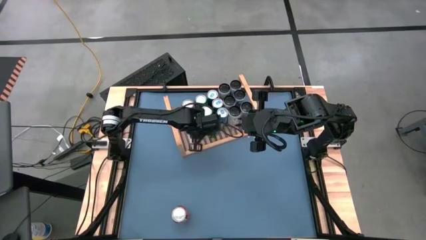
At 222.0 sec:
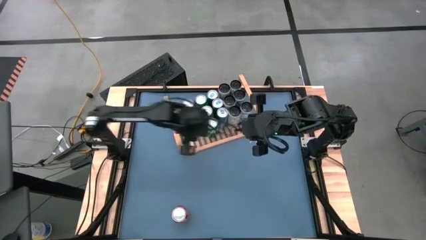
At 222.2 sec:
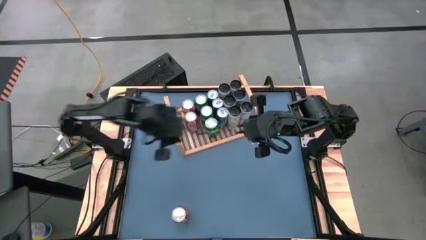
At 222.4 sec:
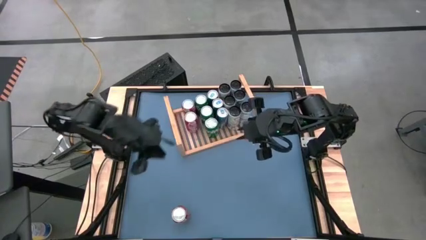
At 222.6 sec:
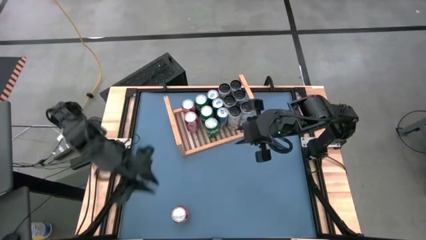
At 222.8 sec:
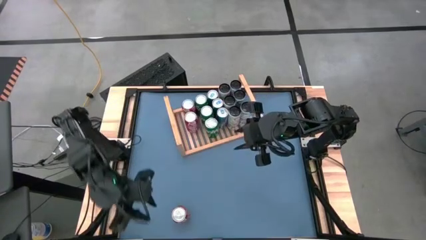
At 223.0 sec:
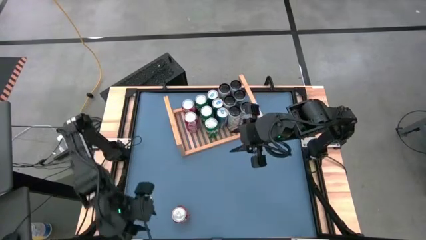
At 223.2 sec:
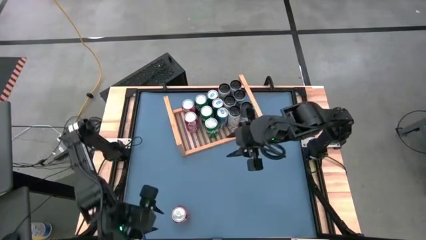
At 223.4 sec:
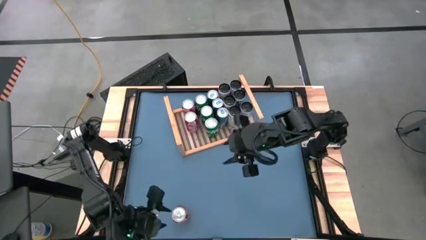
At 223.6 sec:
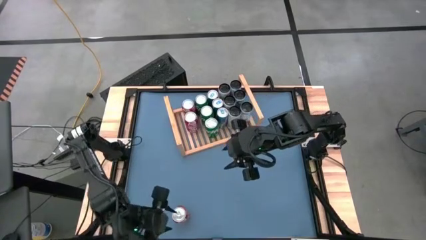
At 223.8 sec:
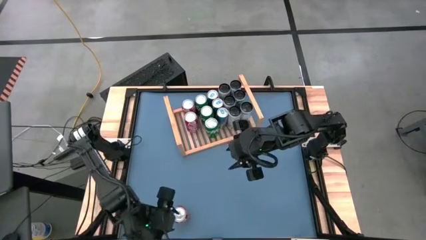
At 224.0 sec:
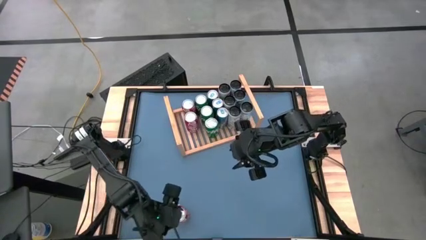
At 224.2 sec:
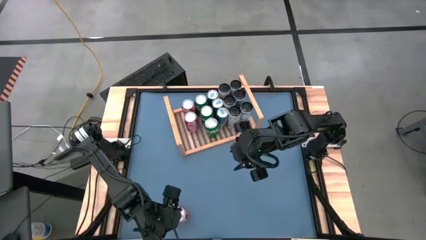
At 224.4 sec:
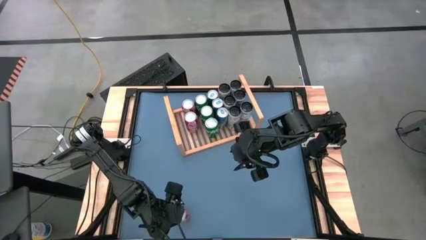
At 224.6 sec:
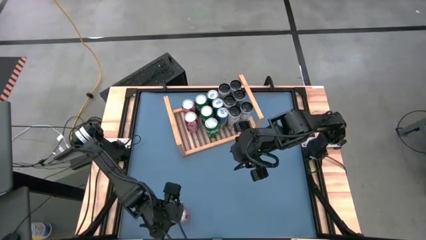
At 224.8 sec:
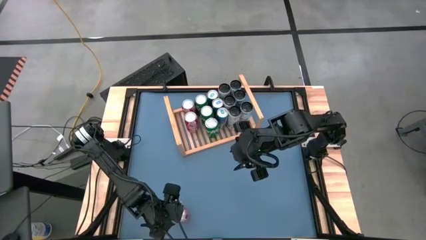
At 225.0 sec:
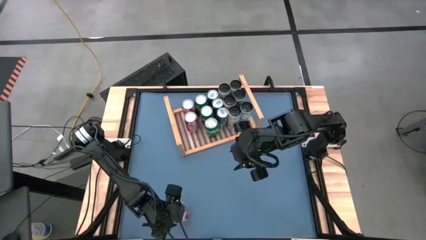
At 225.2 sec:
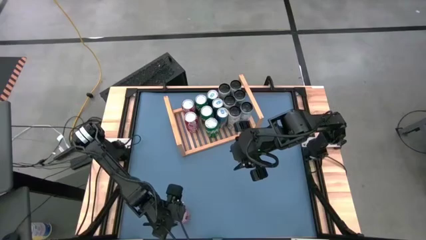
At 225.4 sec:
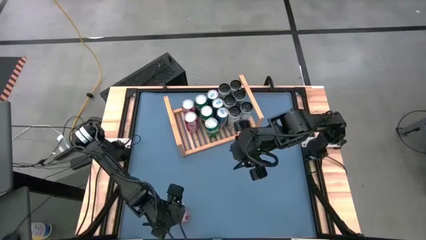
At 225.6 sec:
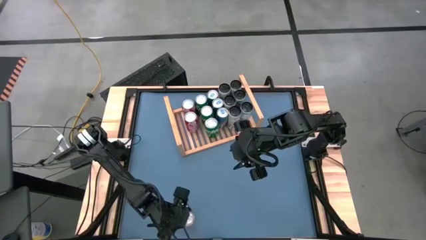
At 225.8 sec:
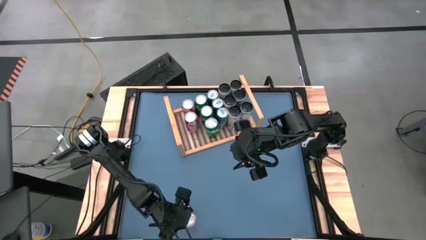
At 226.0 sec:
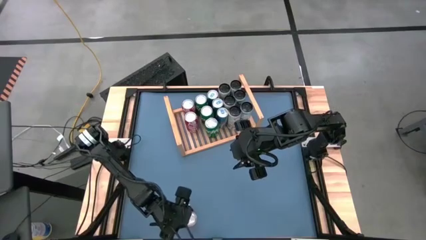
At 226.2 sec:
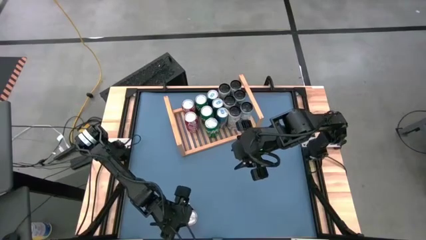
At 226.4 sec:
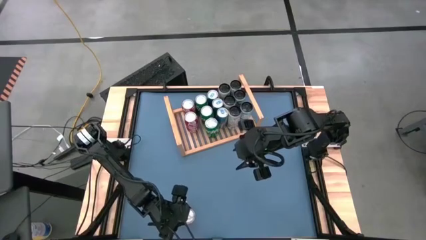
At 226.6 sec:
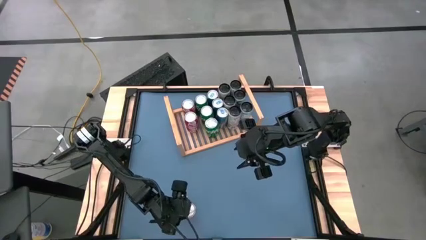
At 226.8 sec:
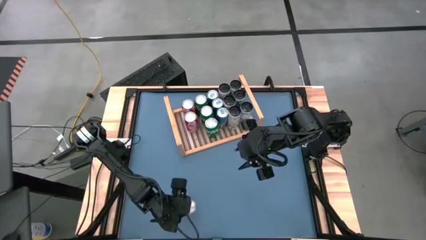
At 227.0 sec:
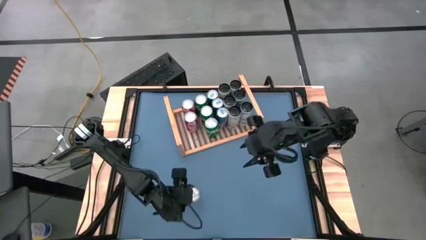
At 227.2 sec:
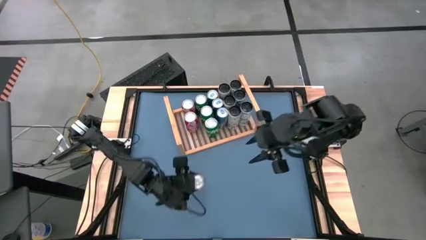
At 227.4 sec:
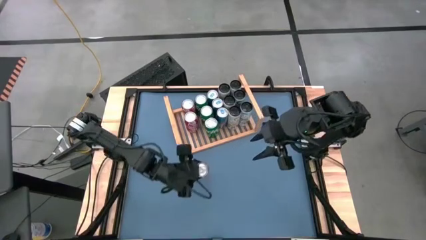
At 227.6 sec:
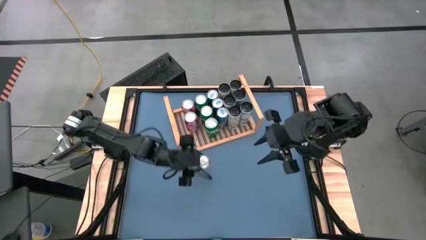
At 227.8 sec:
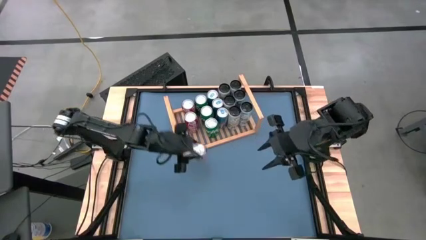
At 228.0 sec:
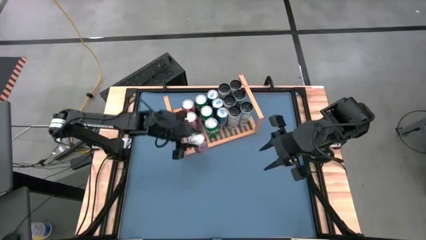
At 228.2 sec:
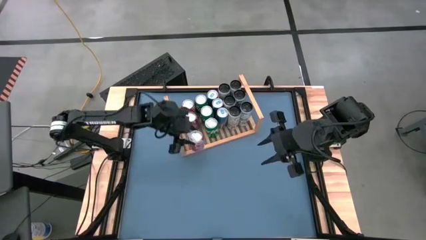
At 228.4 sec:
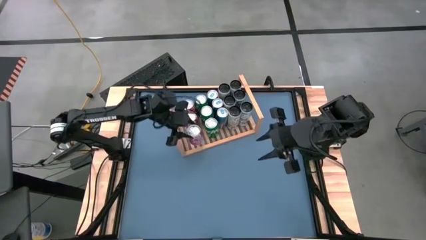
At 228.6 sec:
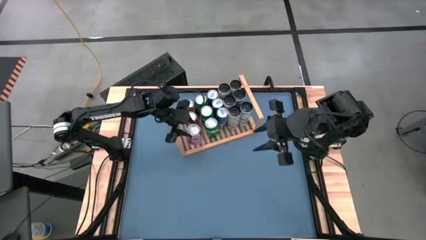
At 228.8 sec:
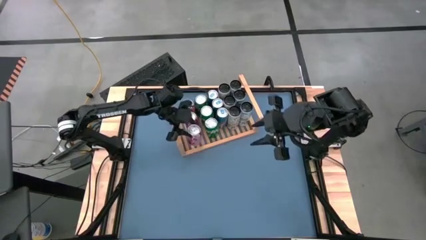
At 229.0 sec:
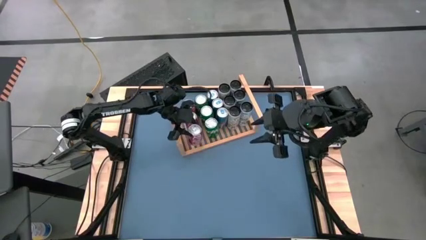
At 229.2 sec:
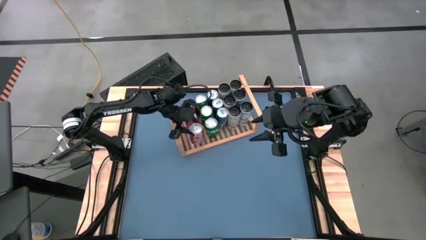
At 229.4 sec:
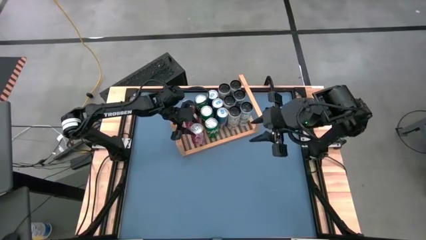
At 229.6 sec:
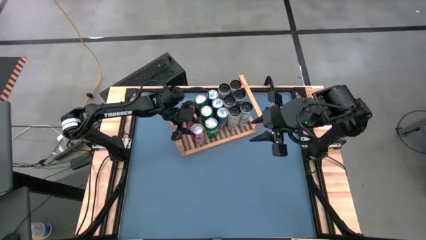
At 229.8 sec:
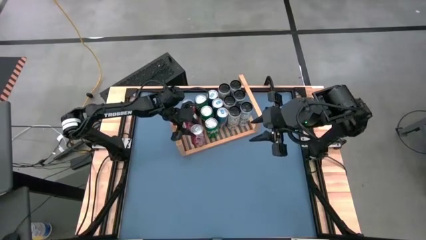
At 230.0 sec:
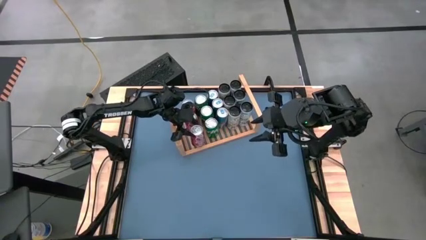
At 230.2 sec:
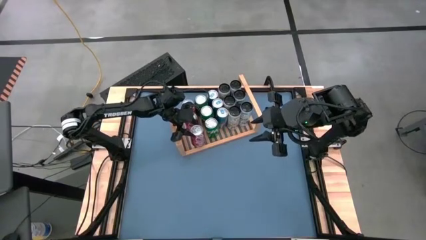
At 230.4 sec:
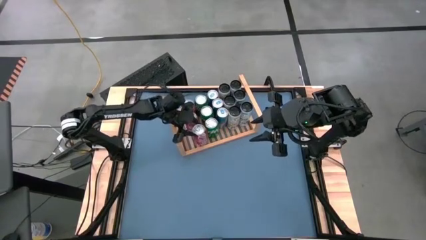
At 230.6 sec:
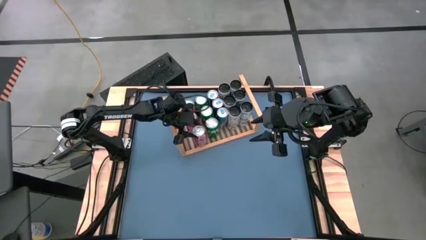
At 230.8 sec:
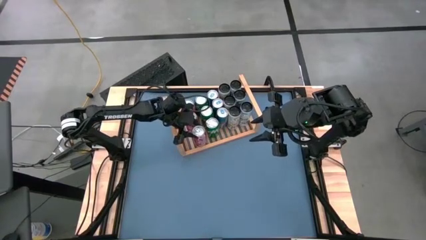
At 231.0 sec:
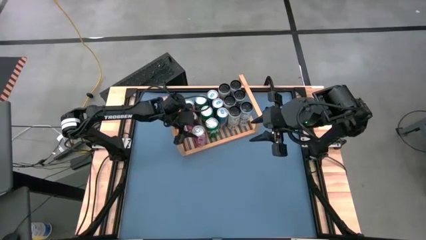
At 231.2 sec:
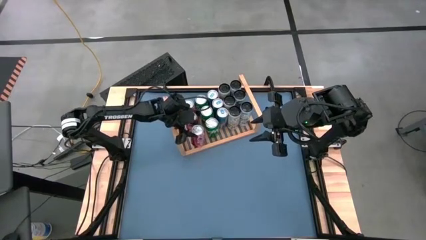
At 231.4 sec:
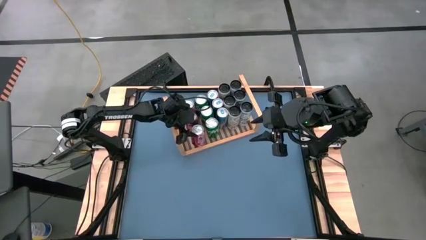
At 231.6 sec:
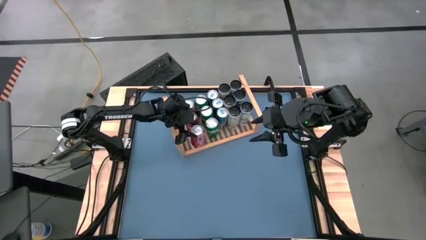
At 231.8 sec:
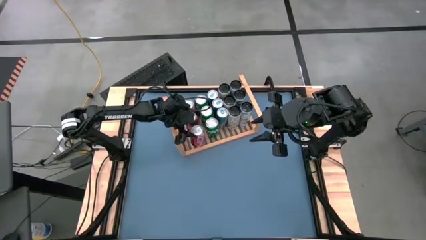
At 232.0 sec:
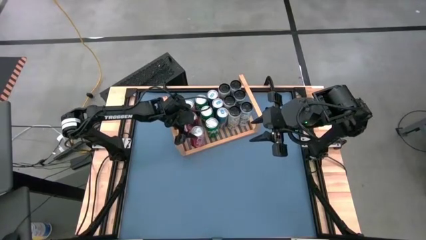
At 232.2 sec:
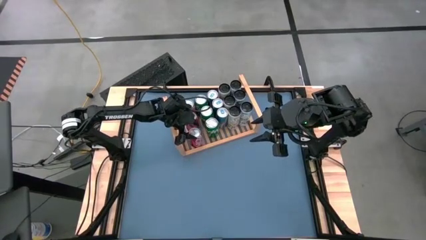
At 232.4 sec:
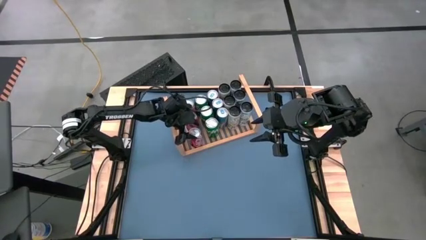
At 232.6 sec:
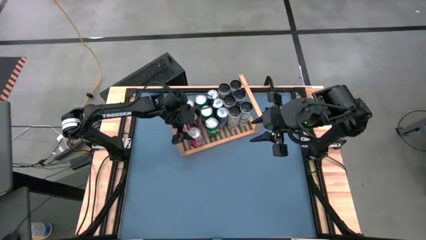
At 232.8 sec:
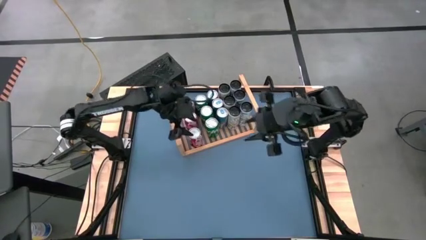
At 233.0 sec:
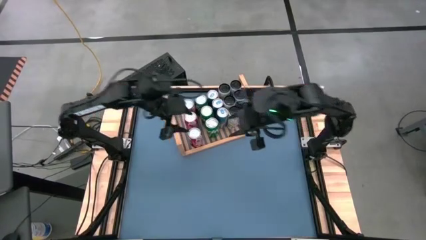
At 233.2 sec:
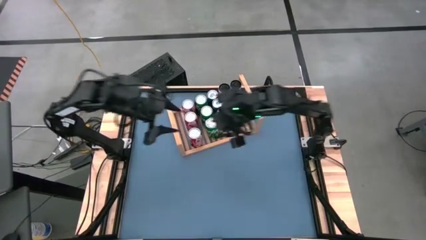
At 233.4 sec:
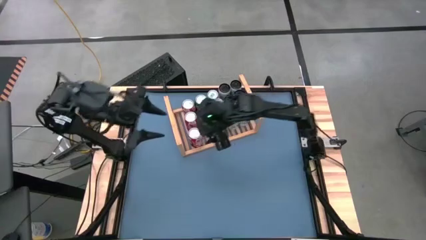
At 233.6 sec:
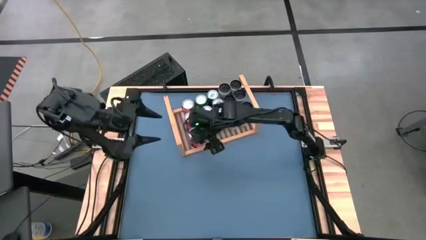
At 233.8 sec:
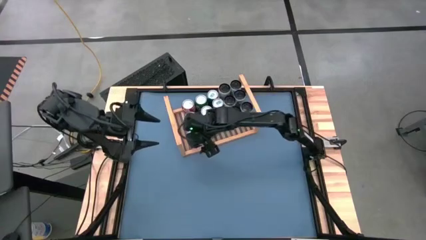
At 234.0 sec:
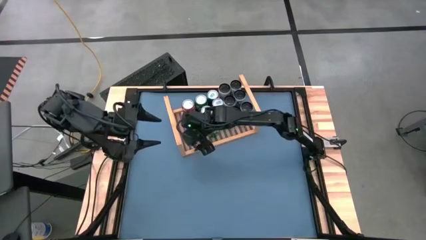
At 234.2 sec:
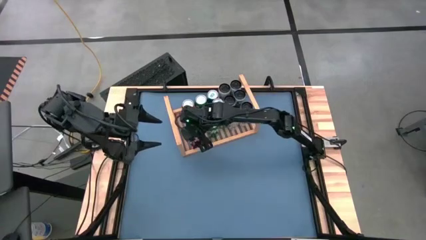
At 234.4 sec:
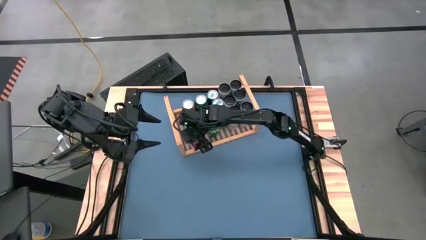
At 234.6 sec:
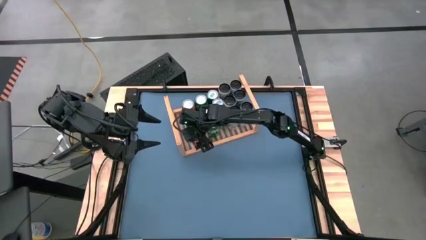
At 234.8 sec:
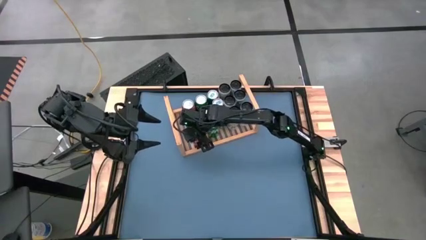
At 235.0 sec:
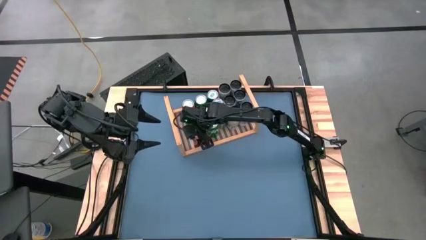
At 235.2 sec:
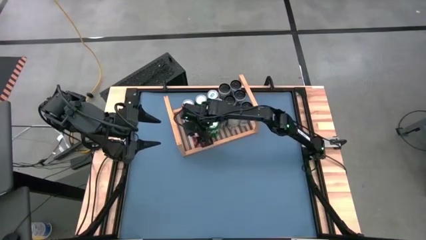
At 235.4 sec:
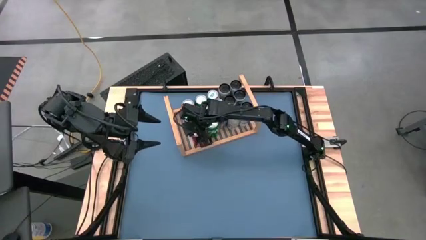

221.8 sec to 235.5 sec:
Task: Place canned beverage on shelf
Put the red-white soda can on the shelf aligned with the other red-white soda cans

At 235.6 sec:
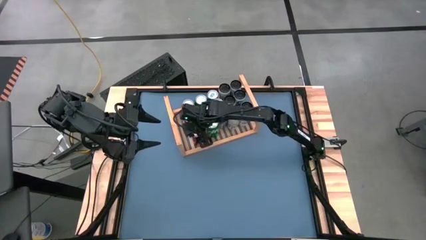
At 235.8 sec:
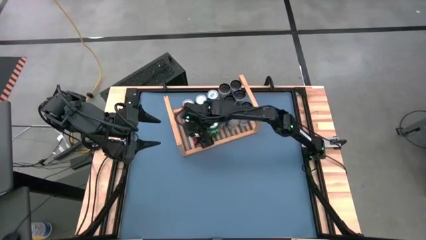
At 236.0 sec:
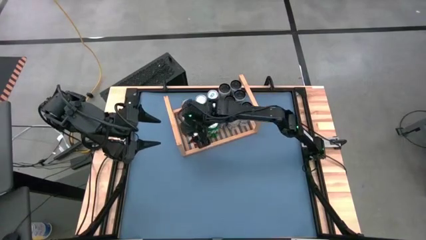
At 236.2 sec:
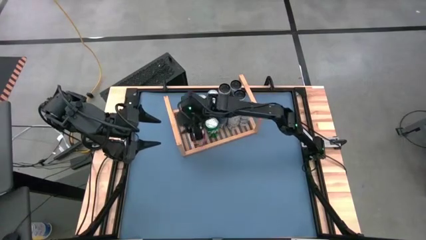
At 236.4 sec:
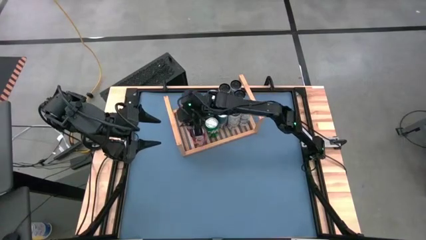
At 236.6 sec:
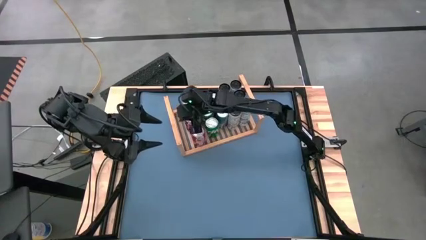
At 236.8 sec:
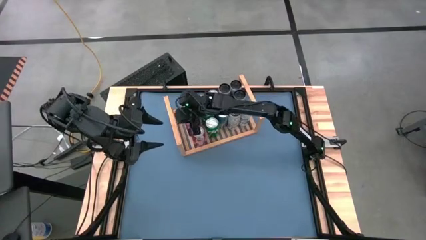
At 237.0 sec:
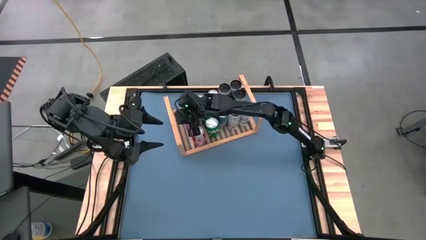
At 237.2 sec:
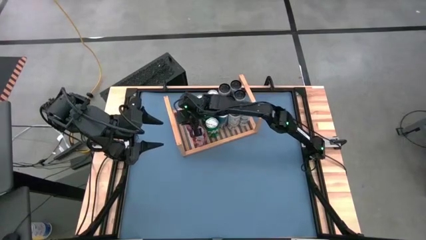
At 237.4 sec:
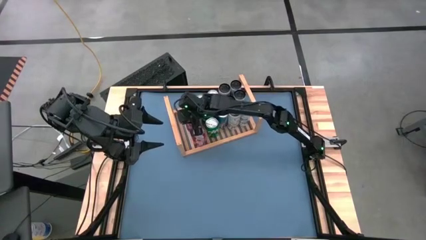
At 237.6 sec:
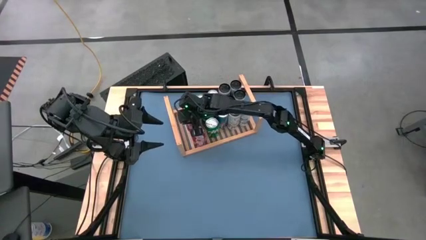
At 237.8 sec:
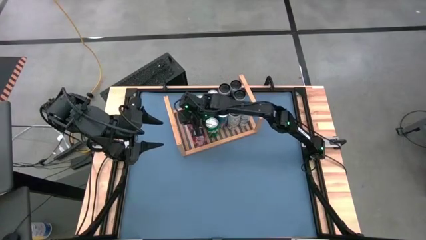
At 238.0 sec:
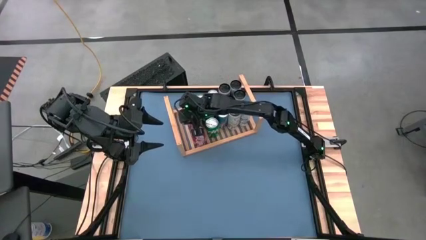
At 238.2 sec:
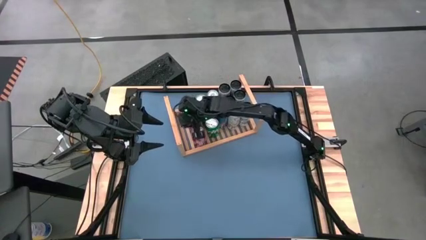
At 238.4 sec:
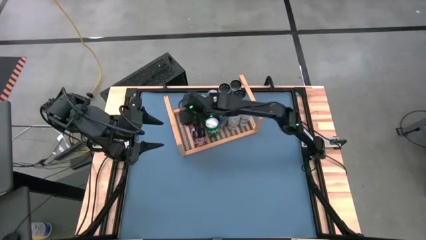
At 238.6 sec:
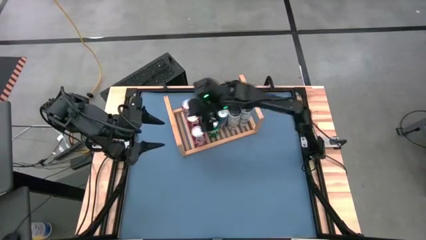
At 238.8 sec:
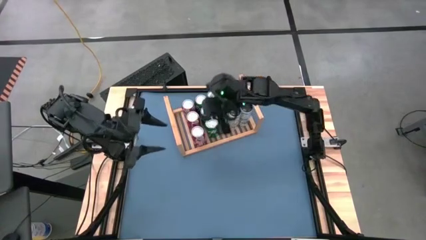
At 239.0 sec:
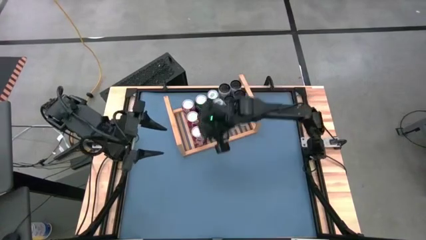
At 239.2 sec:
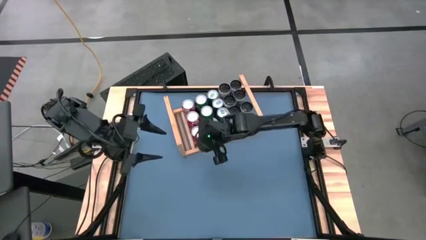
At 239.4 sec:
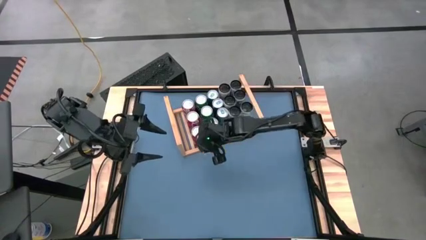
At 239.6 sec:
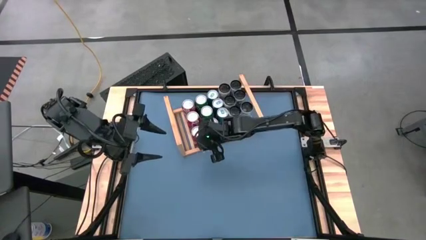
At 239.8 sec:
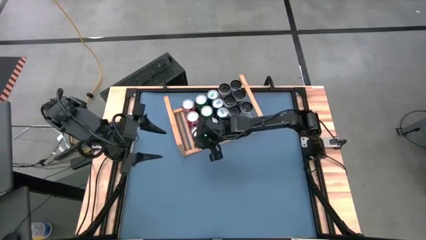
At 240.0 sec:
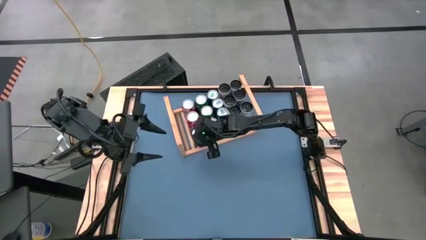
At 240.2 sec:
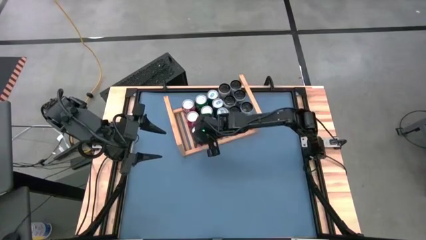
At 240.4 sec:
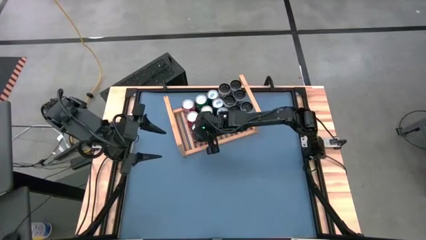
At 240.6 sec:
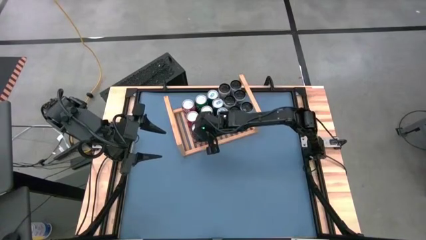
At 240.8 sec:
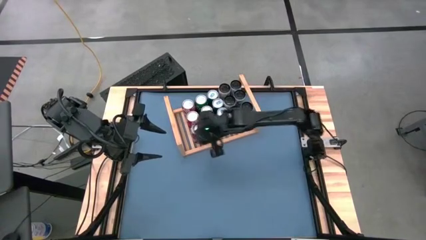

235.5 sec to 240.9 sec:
Adjust the red-white soda cans
